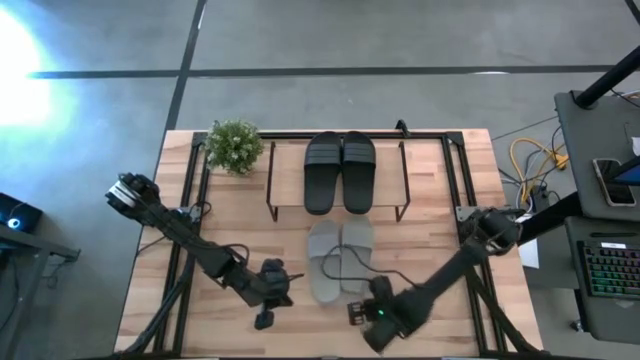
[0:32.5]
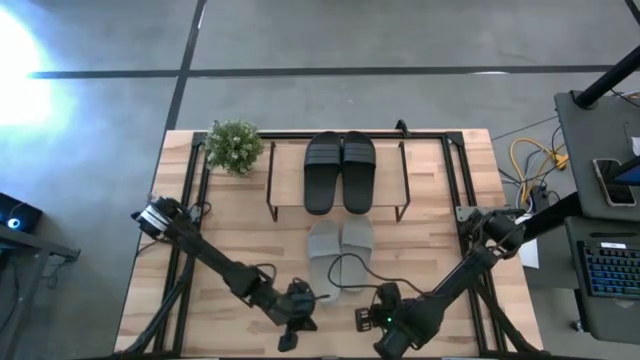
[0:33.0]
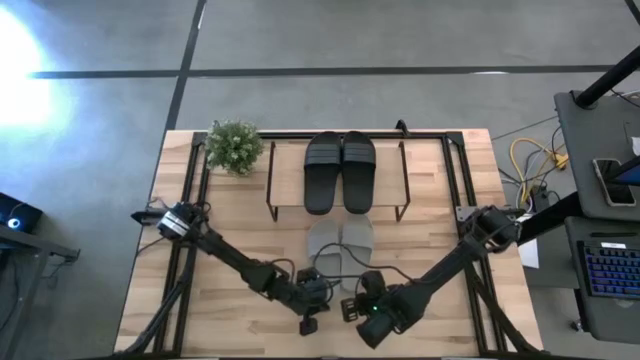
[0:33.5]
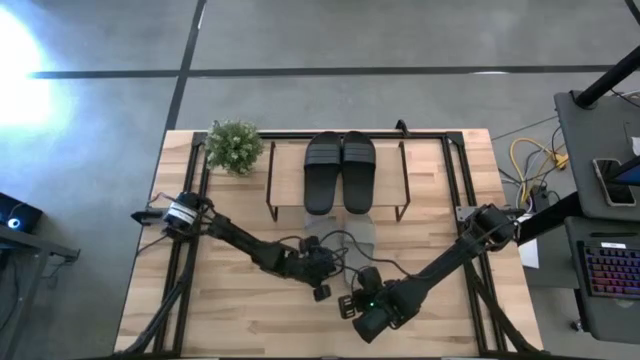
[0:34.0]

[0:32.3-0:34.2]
Task: Pick and place slides into the shelf
Move the left gray slide to the shelf

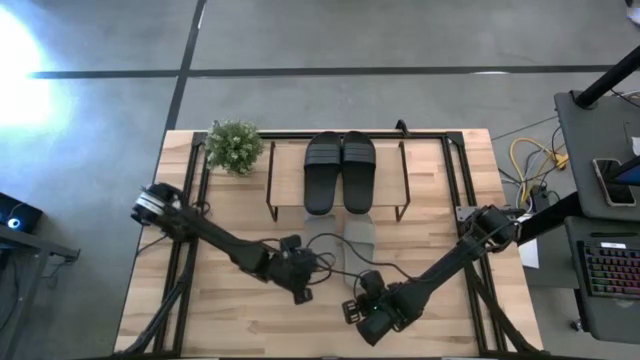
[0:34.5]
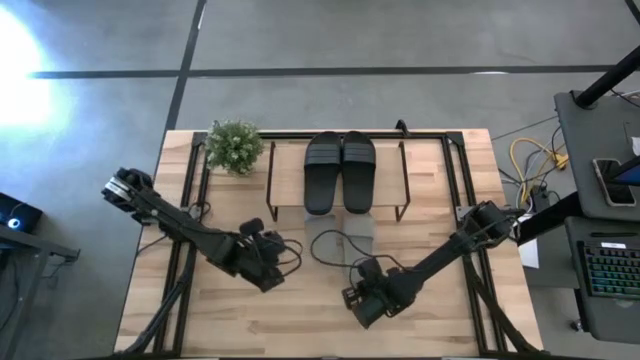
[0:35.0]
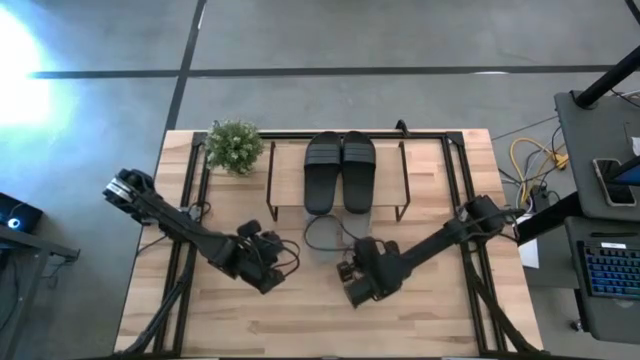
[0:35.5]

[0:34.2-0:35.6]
Move the right gray slide to the shelf

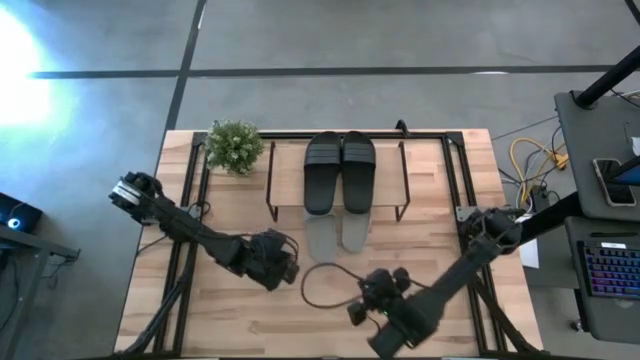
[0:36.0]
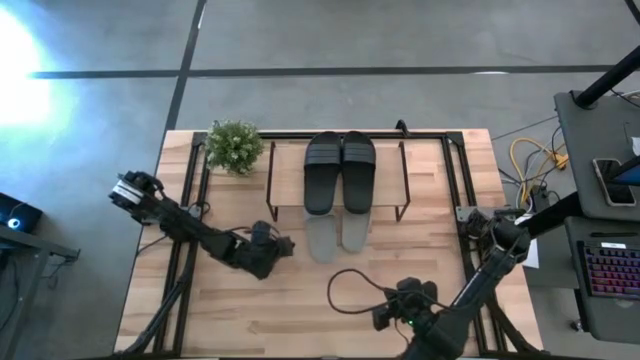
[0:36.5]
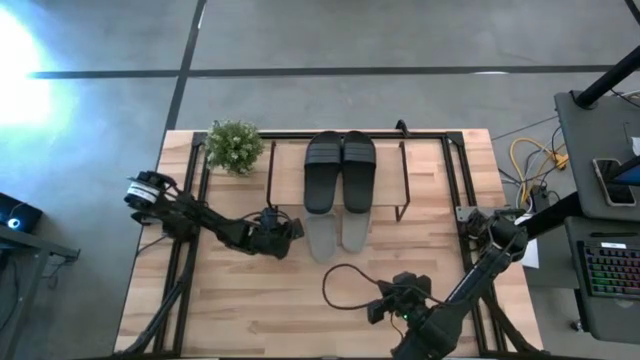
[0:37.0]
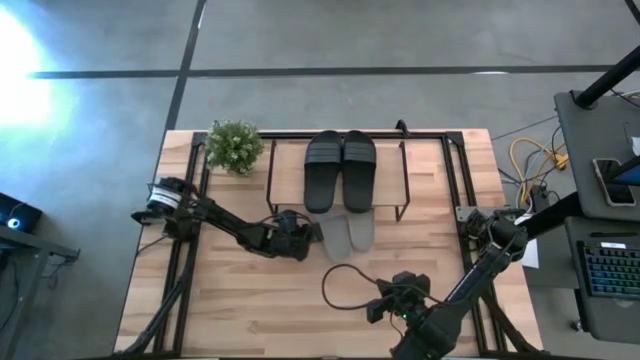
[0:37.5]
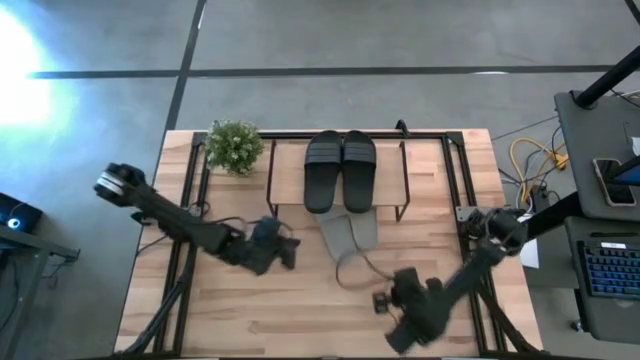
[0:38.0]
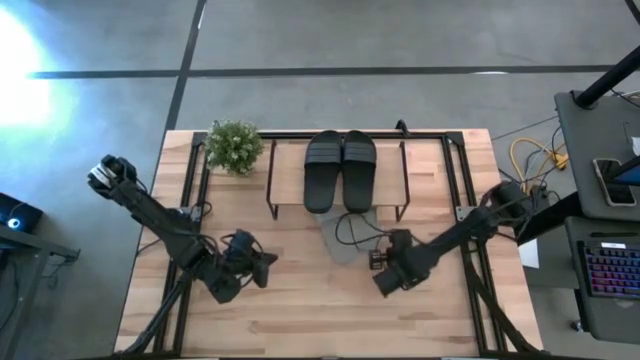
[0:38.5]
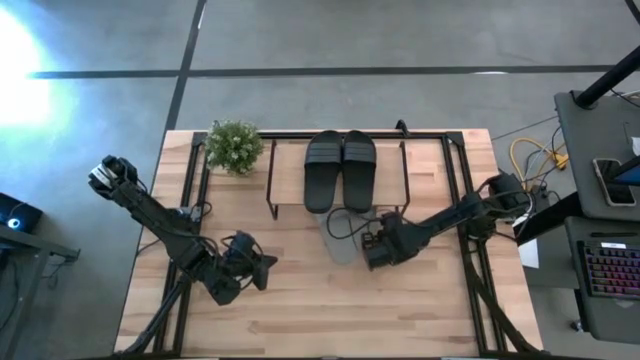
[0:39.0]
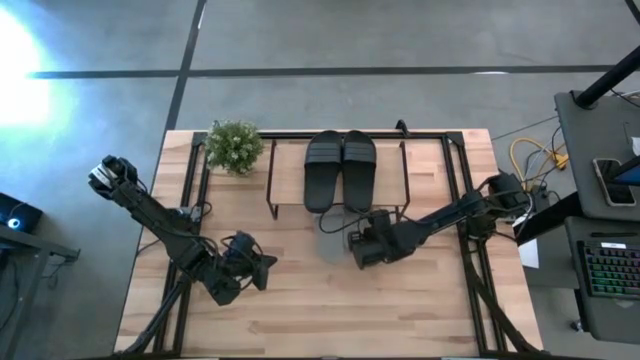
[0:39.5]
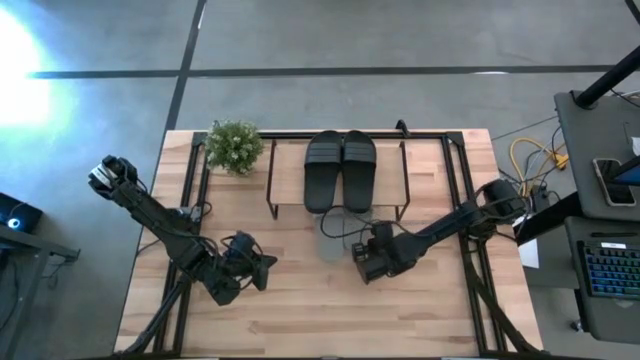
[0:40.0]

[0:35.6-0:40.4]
Adjust the gray slides

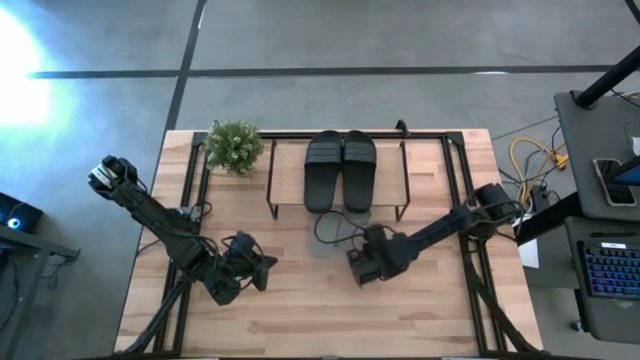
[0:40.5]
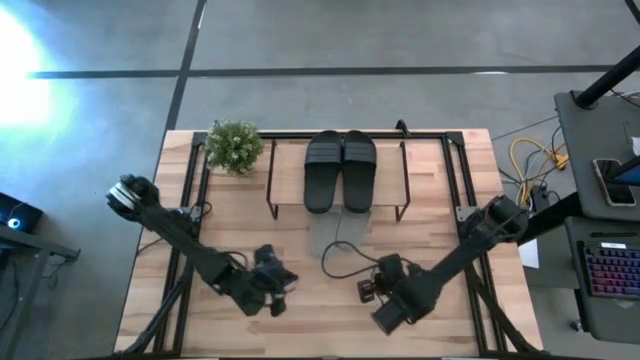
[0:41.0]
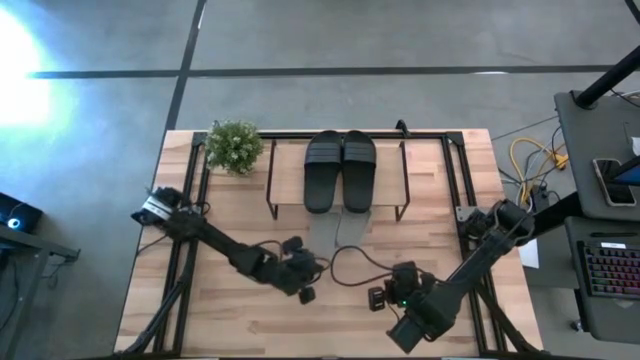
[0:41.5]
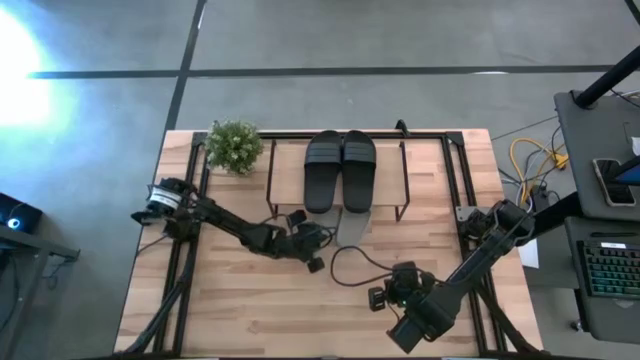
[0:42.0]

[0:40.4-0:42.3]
Move the left gray slide under the shelf

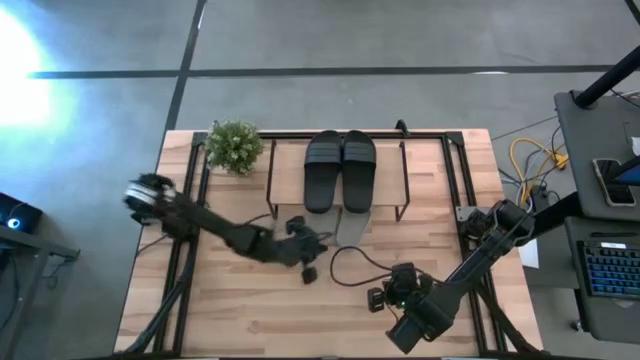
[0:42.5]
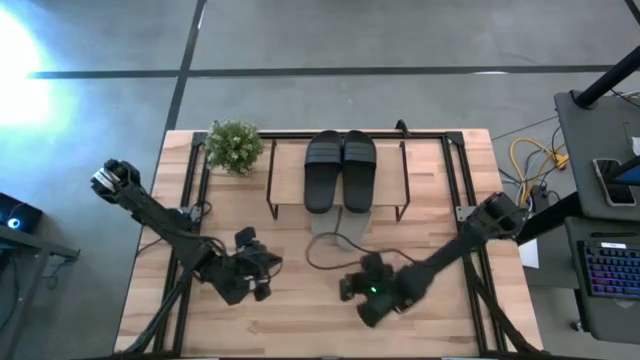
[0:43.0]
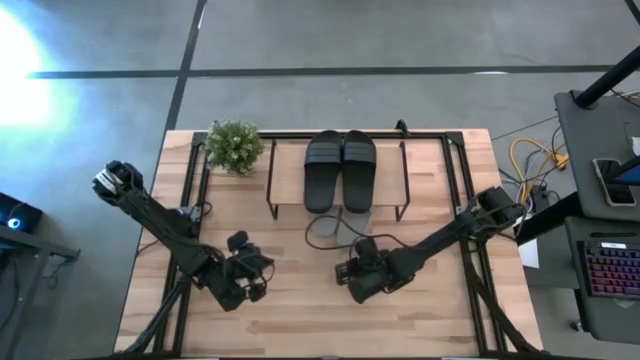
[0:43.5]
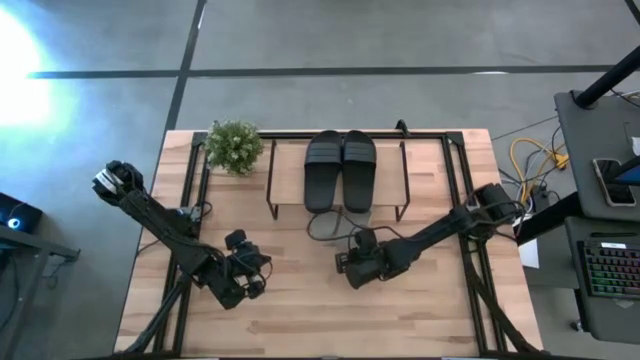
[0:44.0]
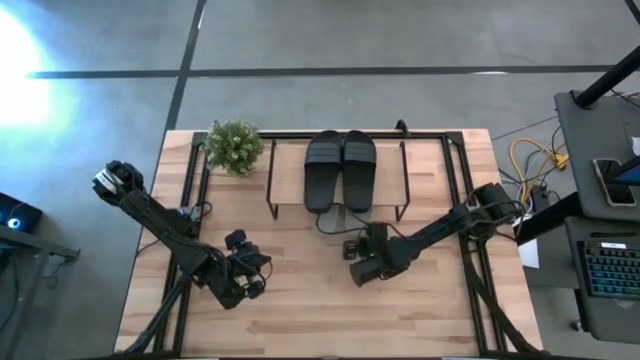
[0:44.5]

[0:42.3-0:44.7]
Move the gray slide under the shelf

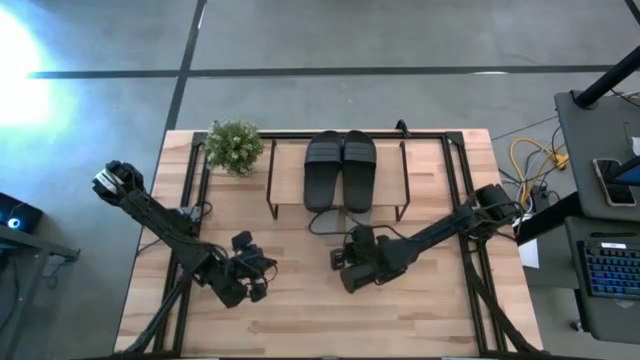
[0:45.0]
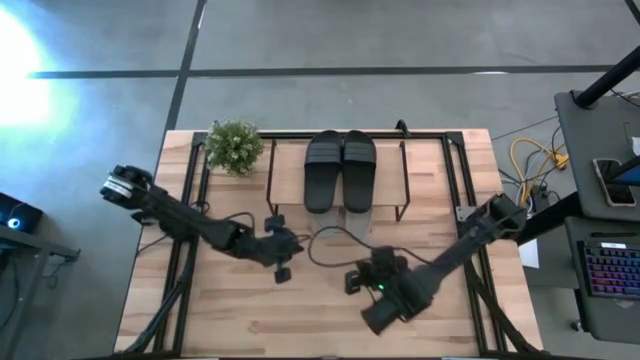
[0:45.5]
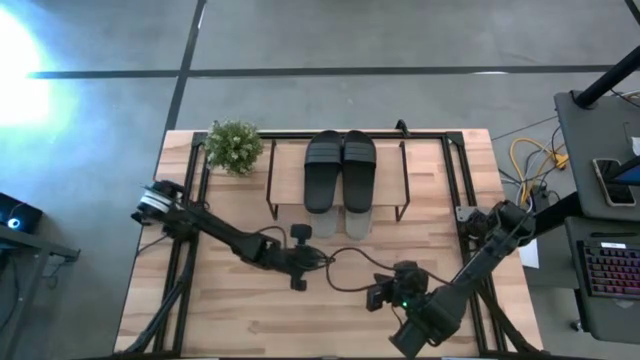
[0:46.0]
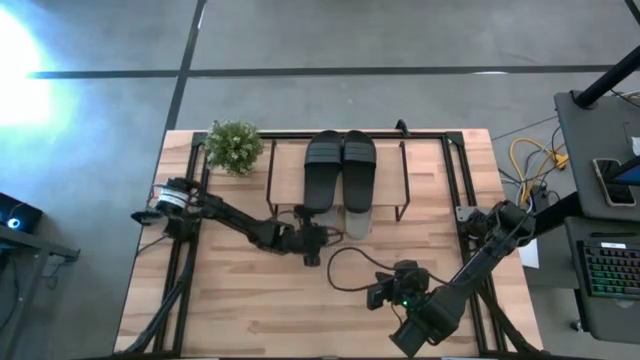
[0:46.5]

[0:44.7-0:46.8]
Adjust the left gray slide under the shelf

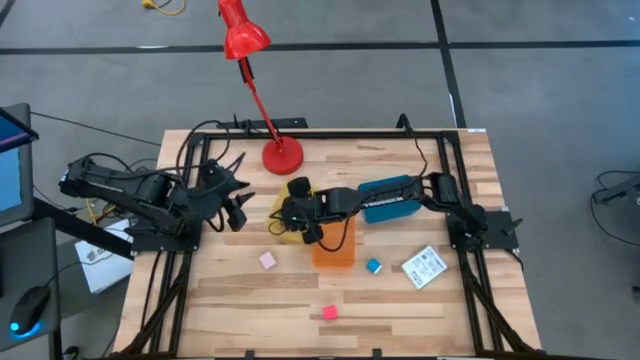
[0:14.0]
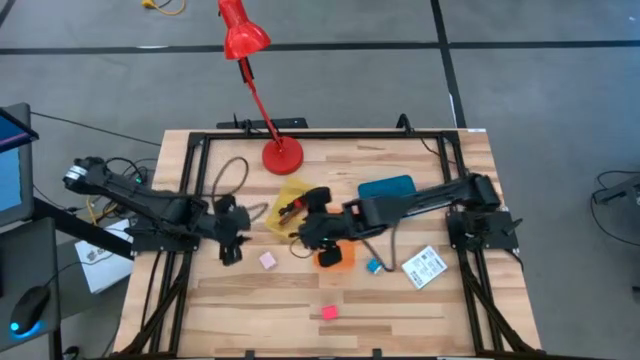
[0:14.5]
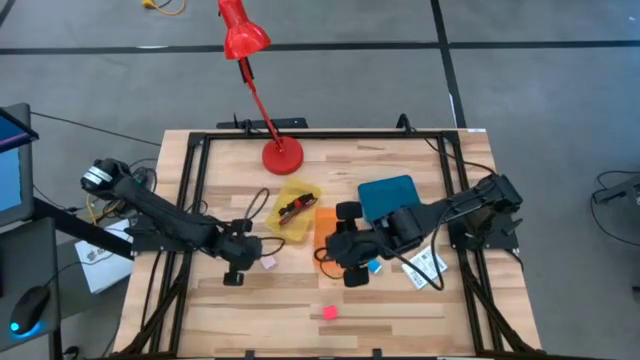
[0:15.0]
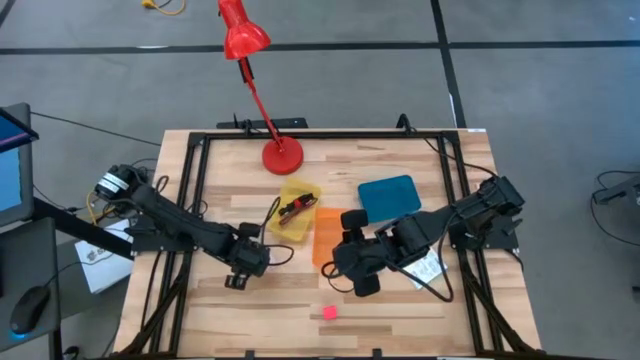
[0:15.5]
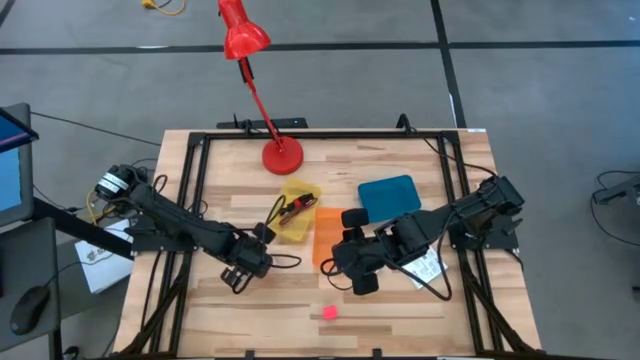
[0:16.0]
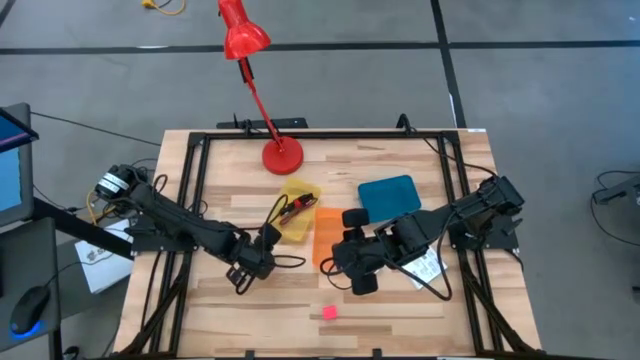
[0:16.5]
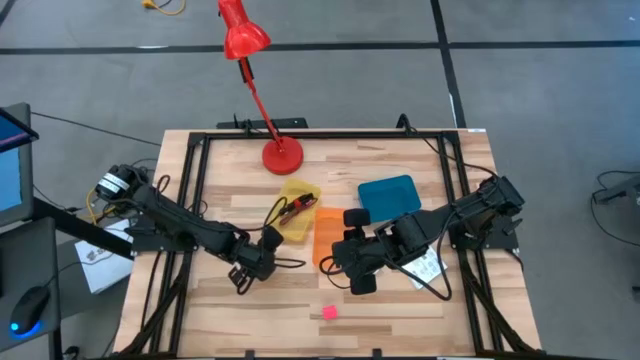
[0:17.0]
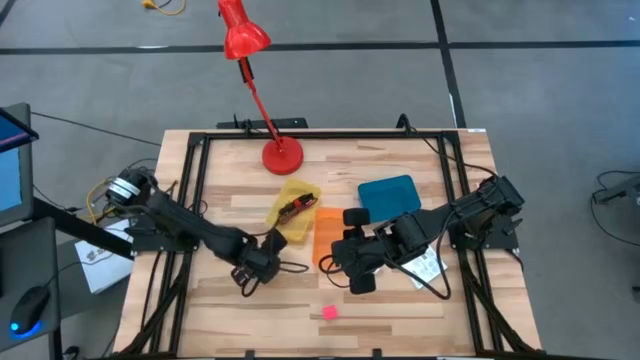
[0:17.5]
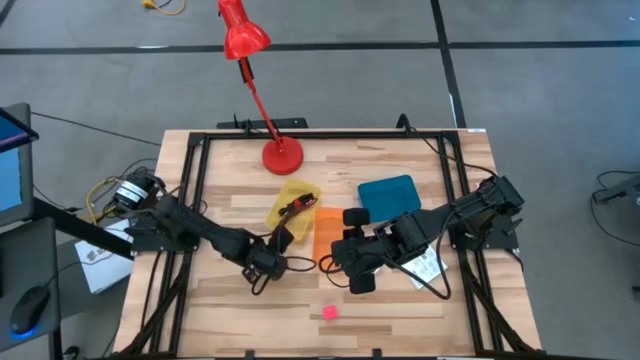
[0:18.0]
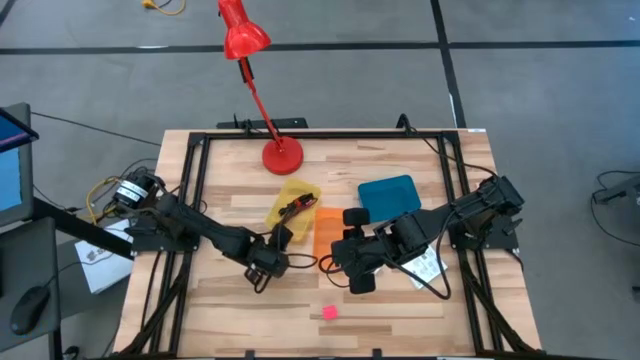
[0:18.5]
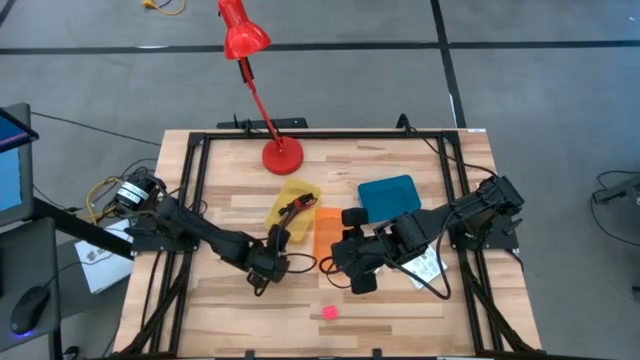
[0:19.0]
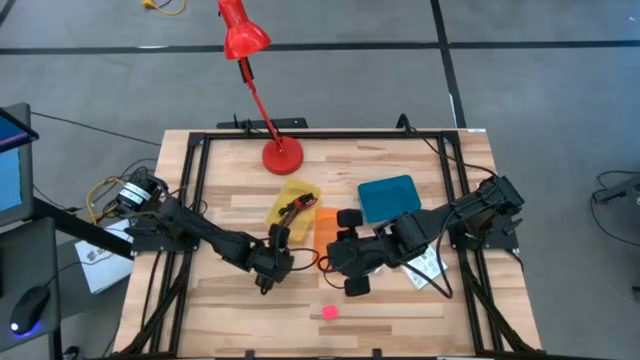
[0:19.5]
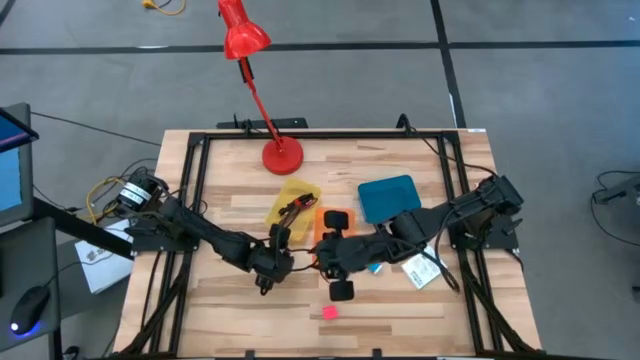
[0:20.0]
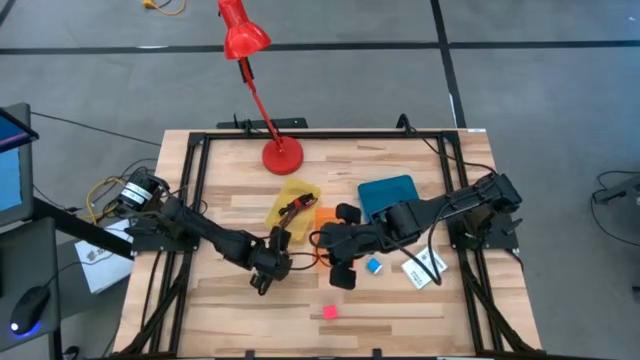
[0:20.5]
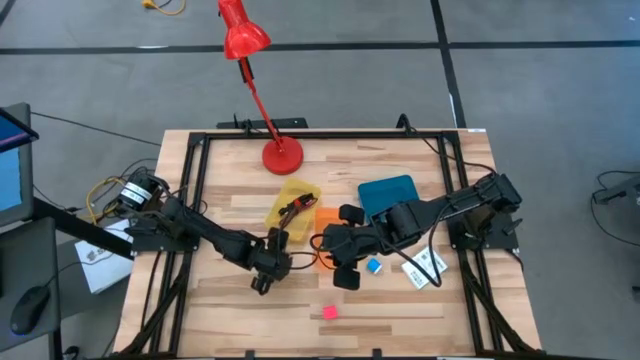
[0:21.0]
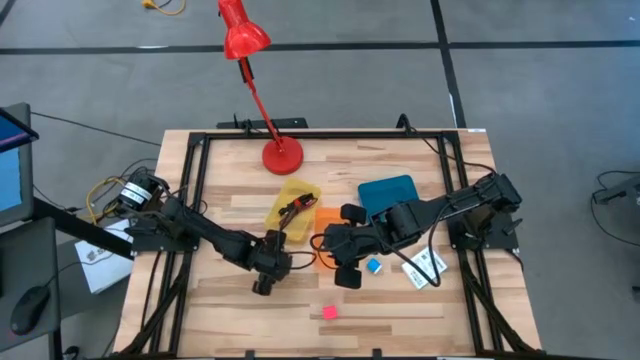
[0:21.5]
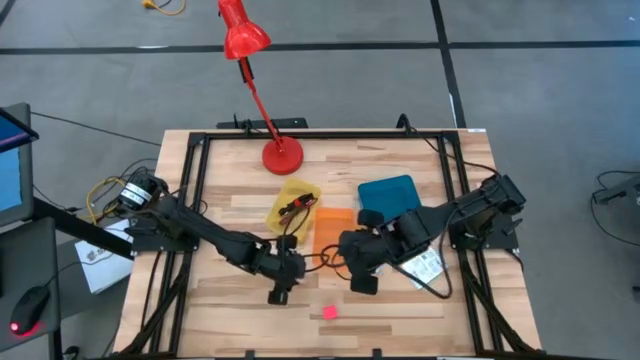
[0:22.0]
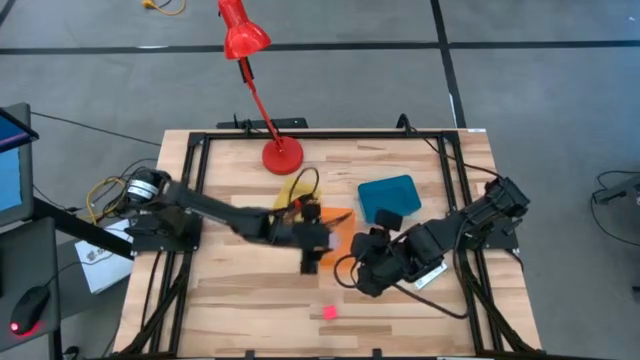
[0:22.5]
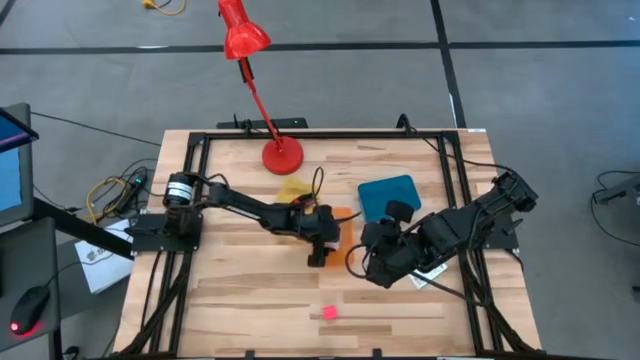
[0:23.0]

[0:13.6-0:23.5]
Task: Pick and place items into bin
Put the white charger adapter into the orange bin
